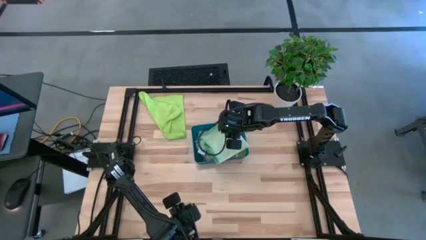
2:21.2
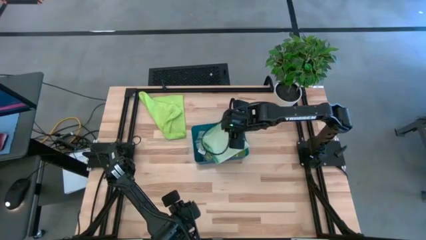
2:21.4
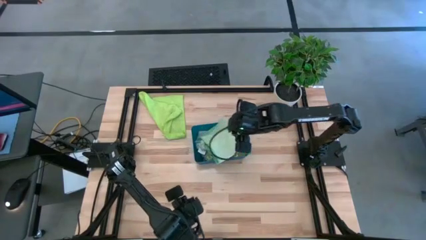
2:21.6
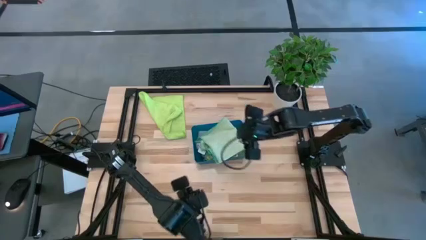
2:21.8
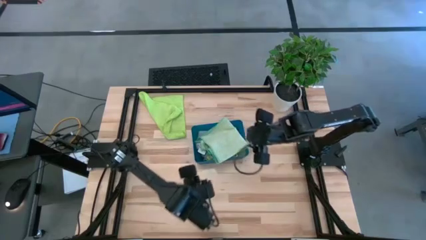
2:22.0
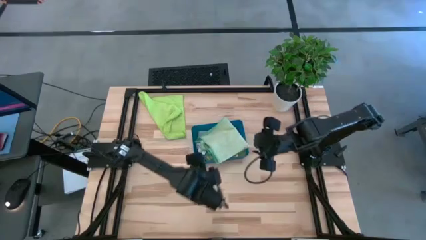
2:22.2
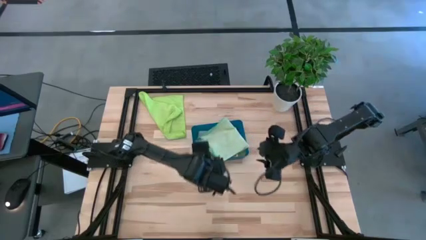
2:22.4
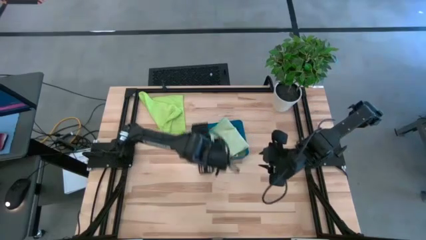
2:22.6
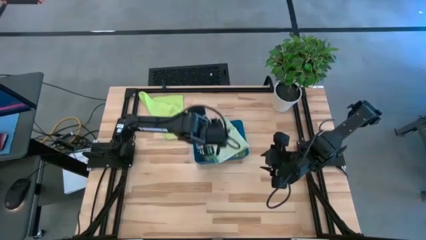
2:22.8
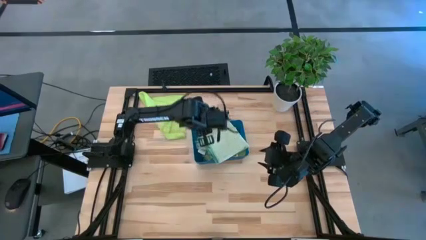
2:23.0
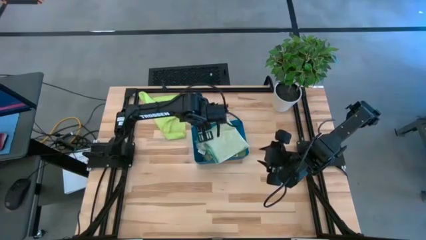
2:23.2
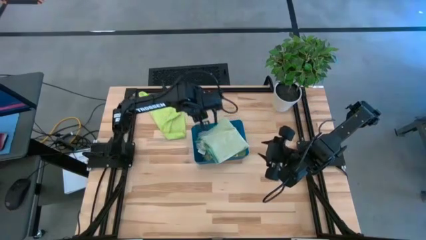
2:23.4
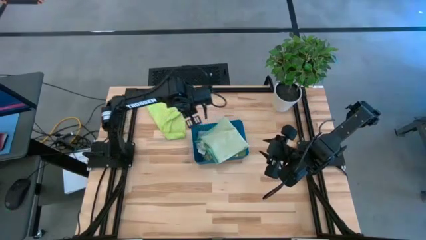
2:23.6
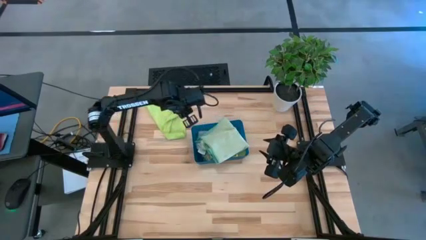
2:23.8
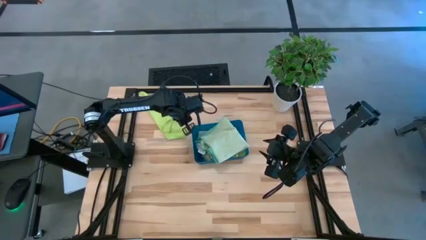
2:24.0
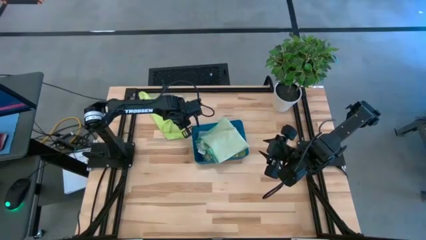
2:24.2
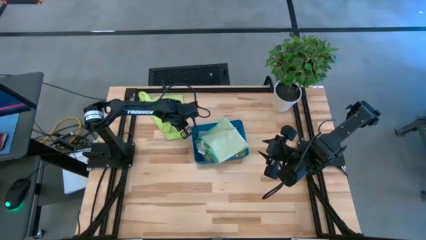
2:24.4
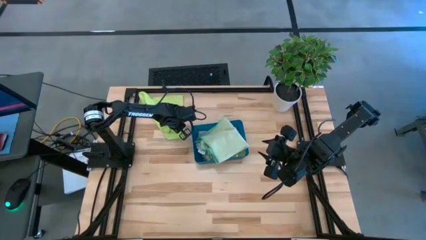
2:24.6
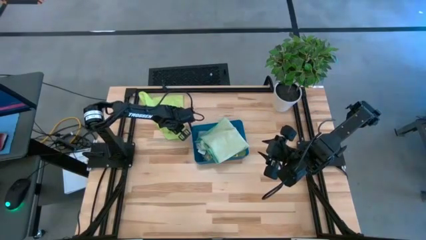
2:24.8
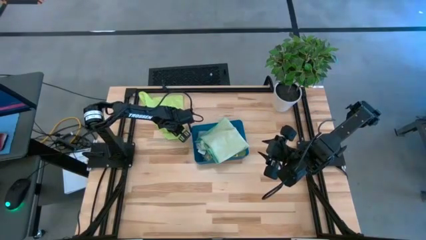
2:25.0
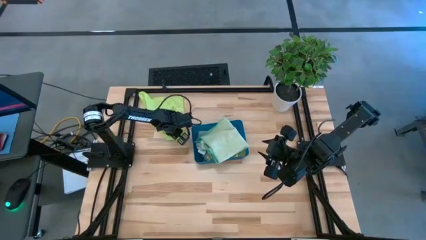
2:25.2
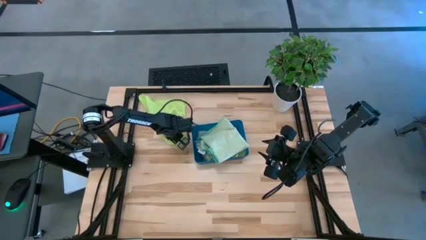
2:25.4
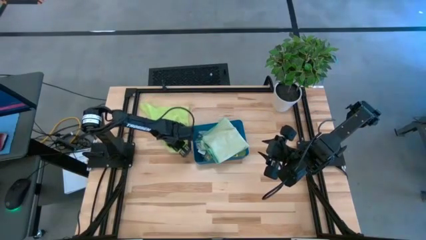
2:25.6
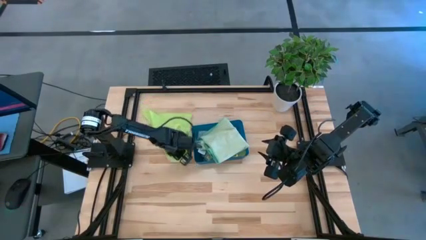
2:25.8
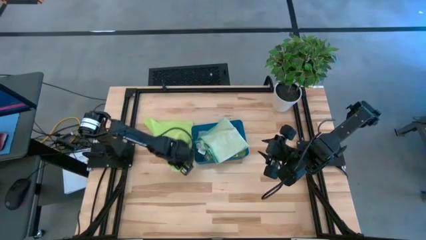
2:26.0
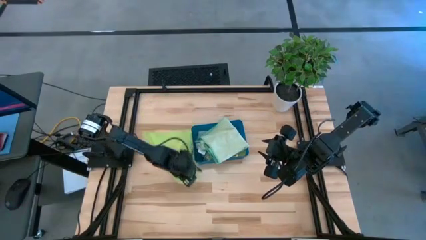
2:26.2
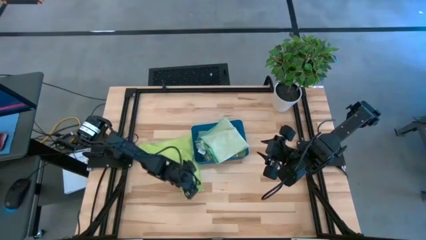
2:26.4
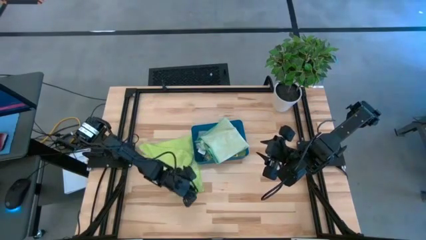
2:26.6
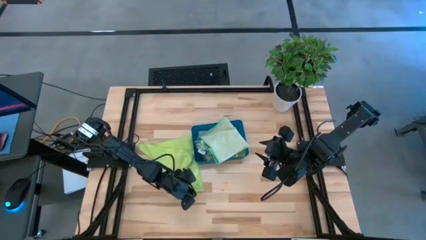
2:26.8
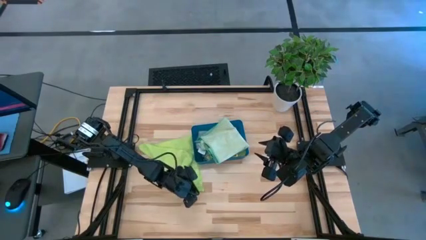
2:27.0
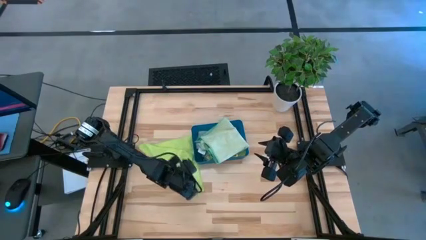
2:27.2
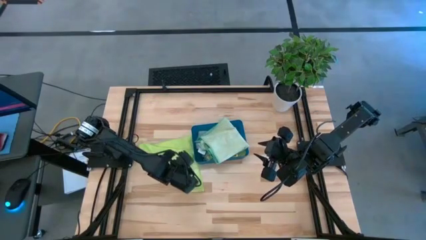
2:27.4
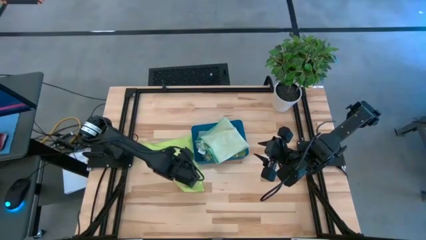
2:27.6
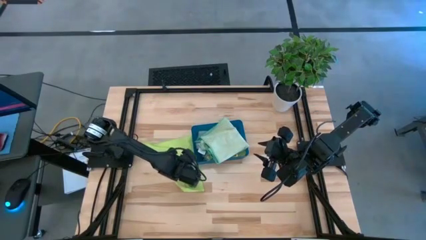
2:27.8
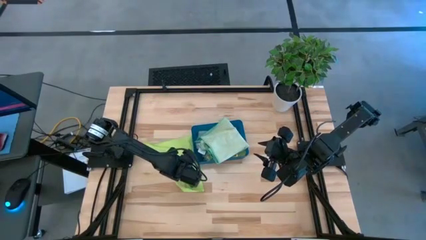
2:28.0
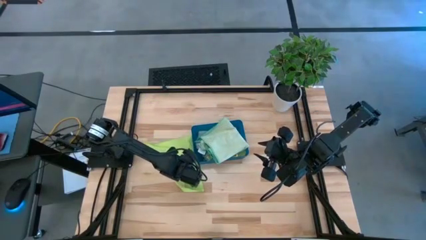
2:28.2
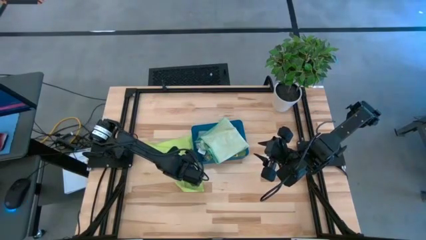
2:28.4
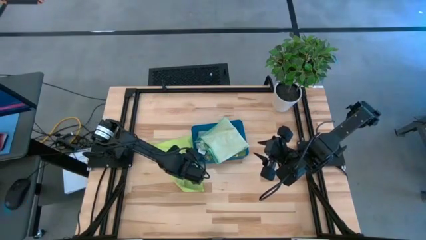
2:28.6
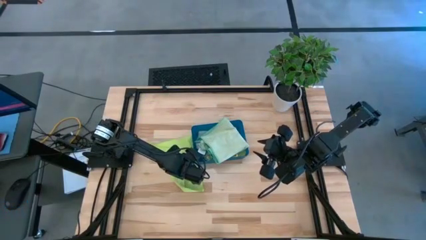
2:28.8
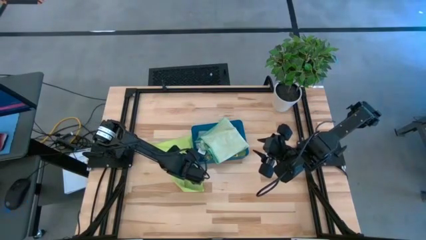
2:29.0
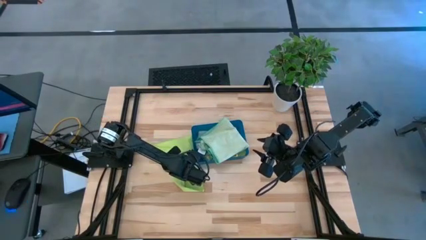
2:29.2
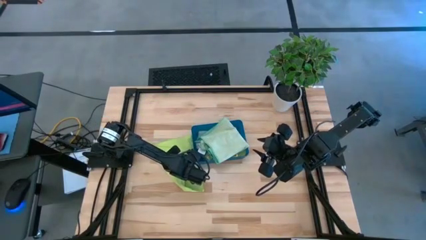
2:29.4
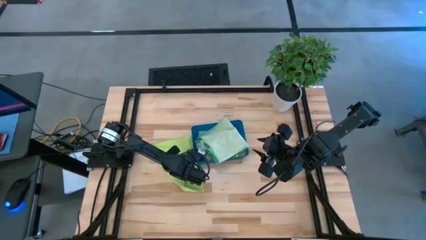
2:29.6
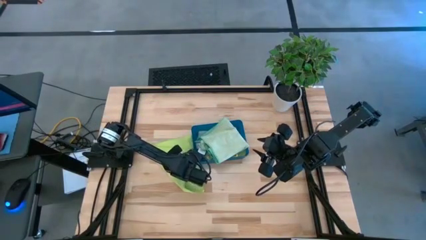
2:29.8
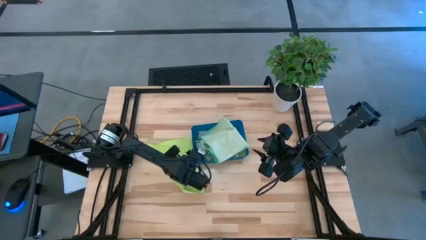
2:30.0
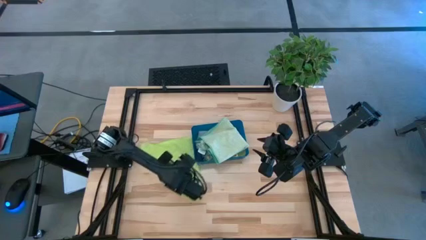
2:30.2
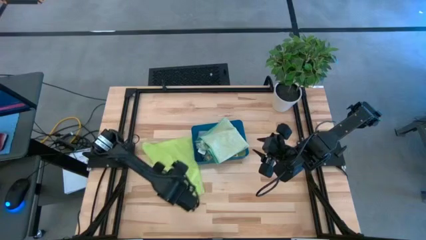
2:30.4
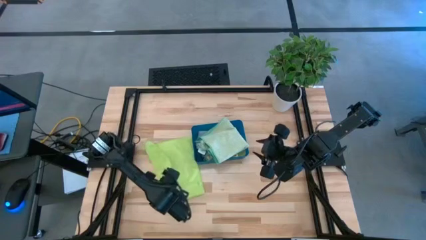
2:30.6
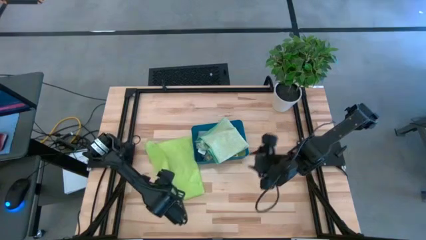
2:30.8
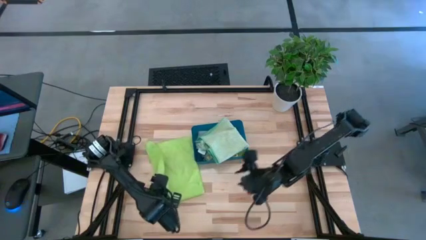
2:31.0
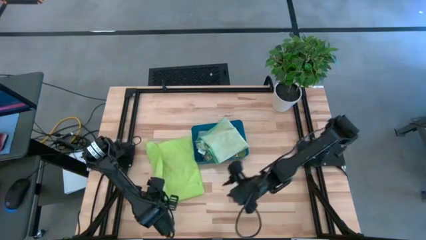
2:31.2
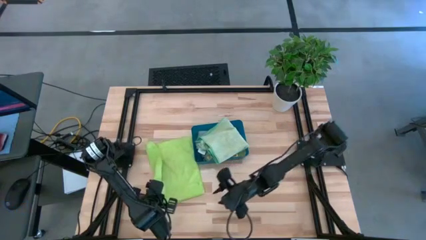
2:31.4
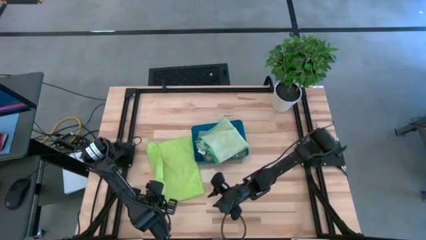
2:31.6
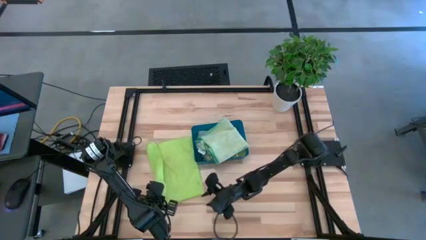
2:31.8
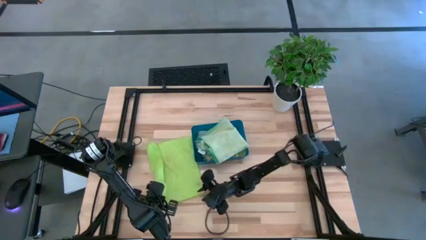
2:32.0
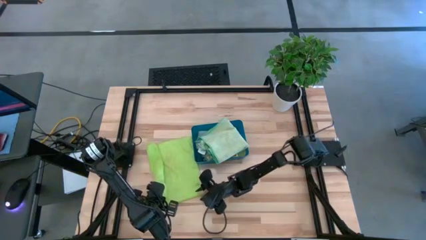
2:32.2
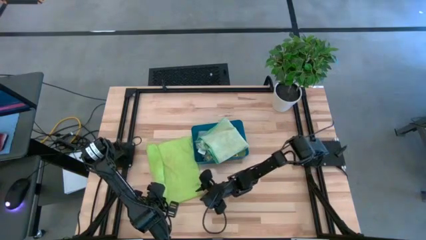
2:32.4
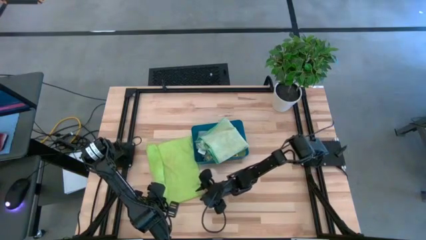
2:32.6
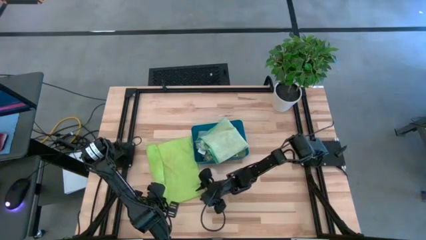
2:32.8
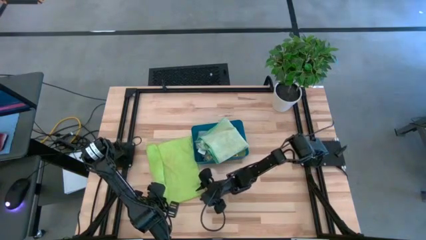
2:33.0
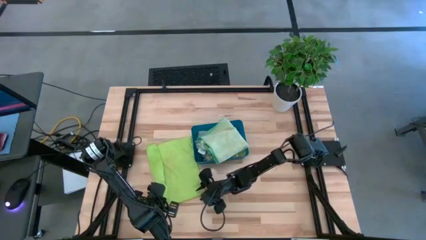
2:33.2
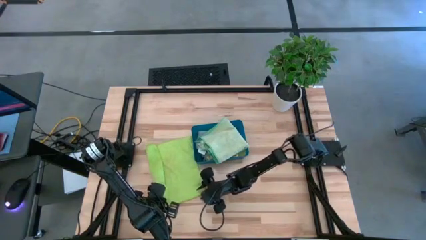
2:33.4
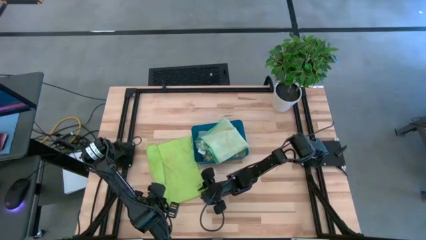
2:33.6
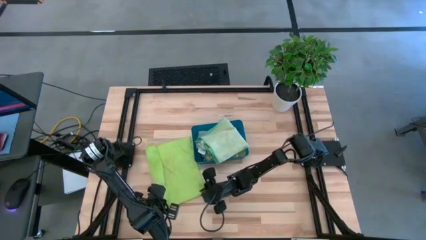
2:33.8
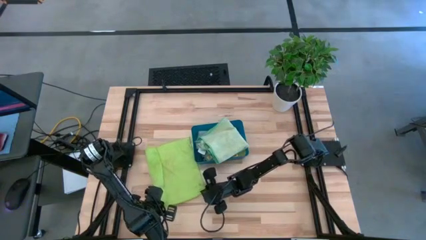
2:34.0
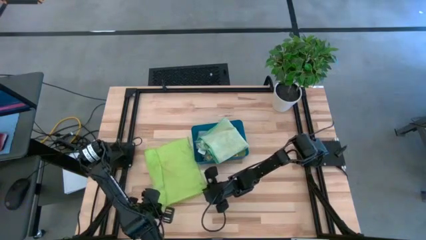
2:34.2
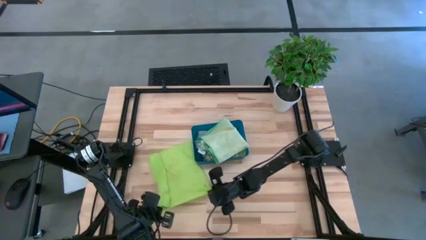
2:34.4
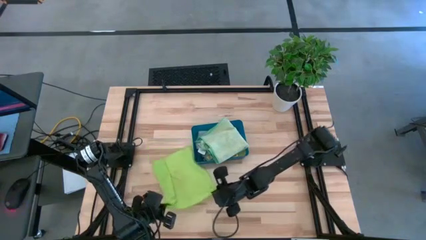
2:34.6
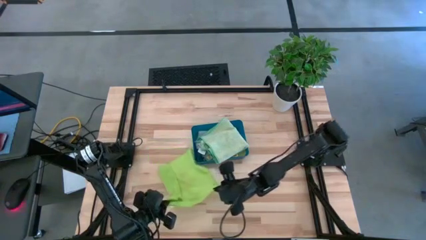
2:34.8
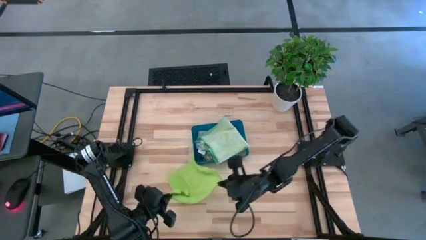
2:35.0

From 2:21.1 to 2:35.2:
Task: Fold microfiber towels
Fold the green microfiber towel

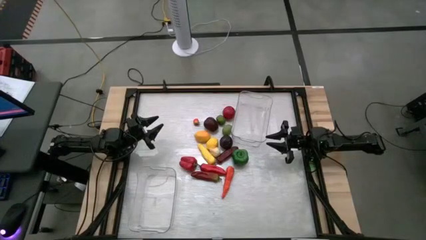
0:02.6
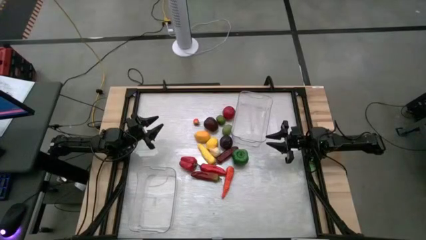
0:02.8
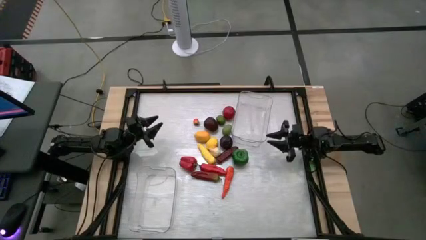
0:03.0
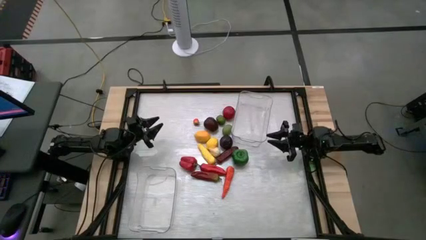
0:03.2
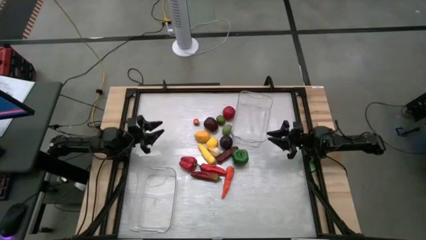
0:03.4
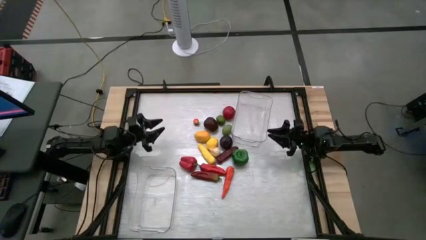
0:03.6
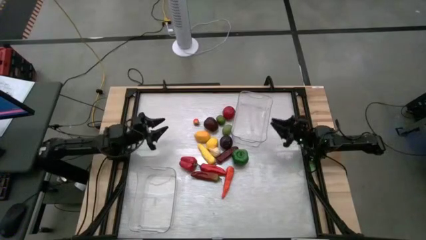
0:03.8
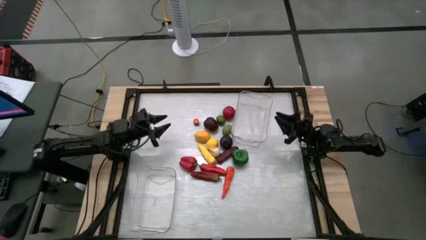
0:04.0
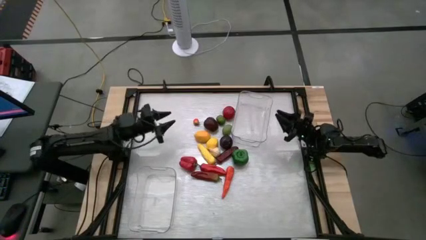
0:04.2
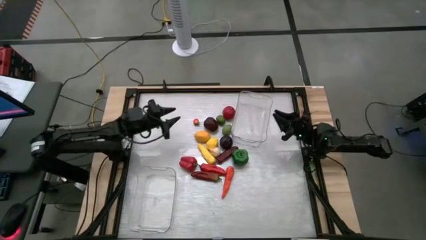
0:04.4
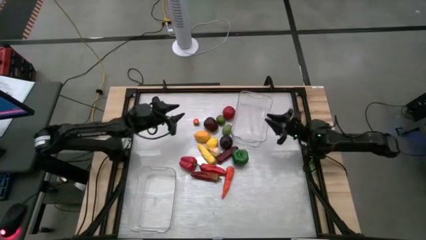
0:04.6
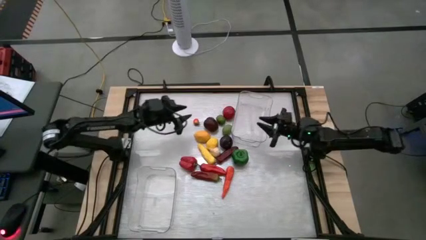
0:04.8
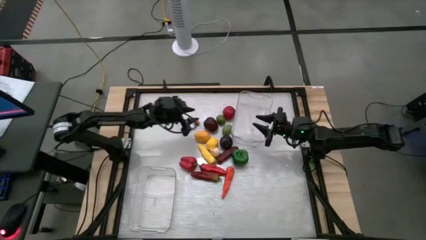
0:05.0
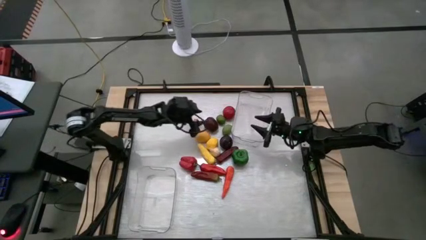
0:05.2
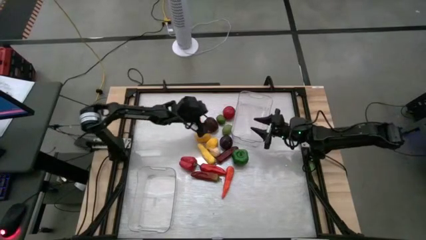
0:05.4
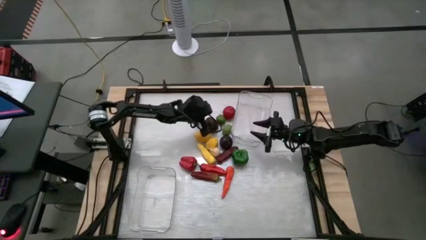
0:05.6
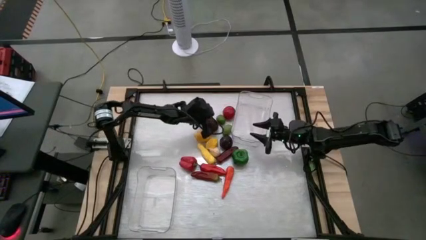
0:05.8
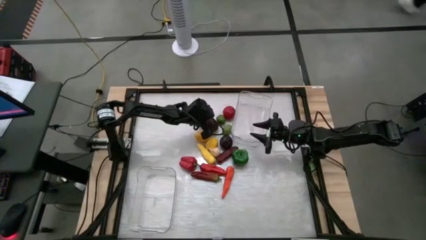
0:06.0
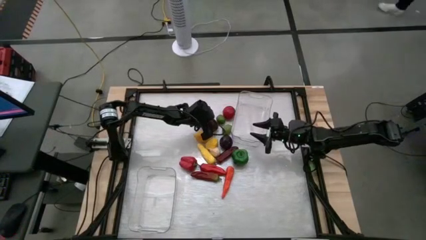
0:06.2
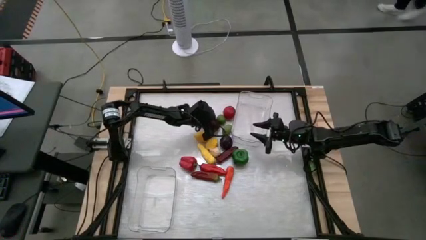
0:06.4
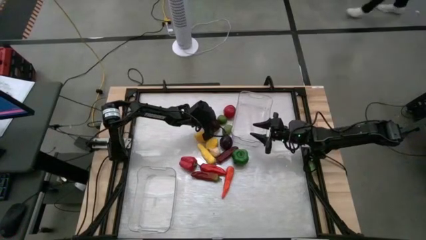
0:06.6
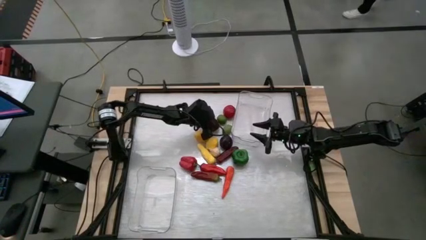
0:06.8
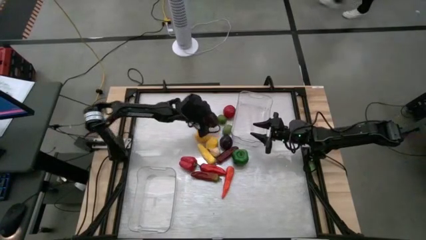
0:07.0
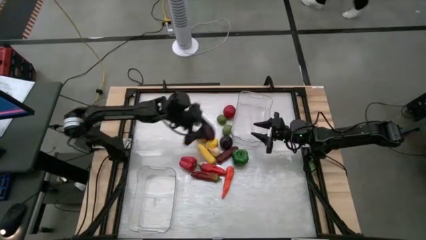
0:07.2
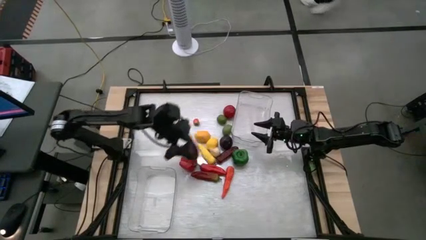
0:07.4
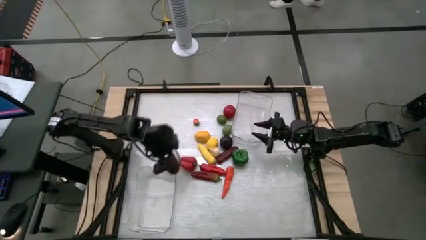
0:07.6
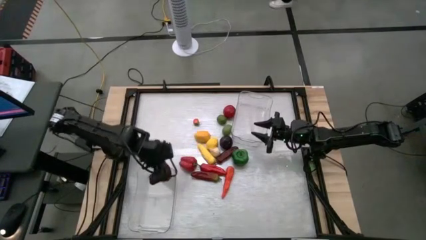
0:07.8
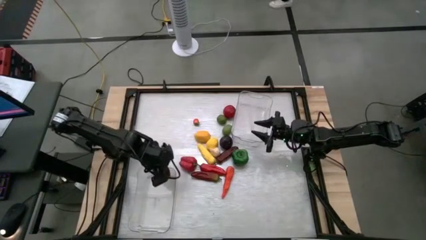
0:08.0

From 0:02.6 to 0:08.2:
Task: Sort produce into baskets
Put the dark red apple into the bottom transparent bin
